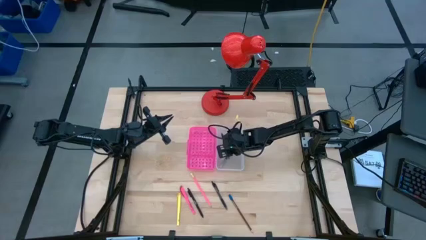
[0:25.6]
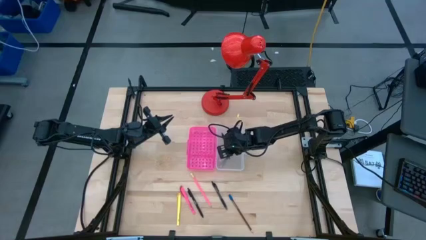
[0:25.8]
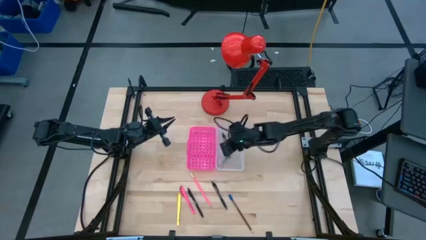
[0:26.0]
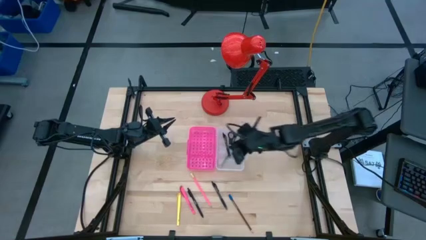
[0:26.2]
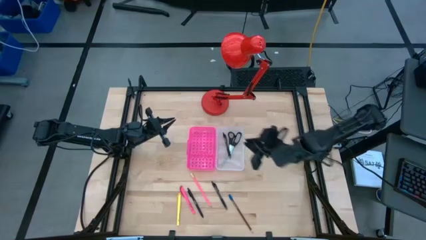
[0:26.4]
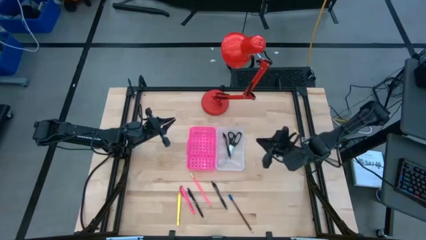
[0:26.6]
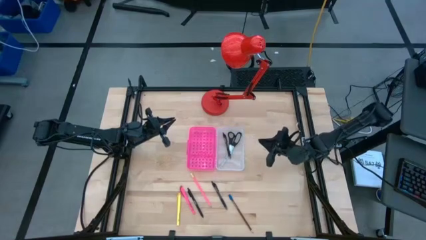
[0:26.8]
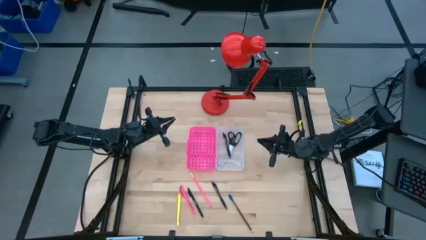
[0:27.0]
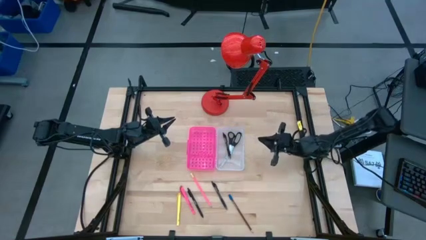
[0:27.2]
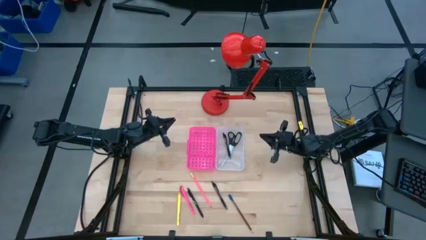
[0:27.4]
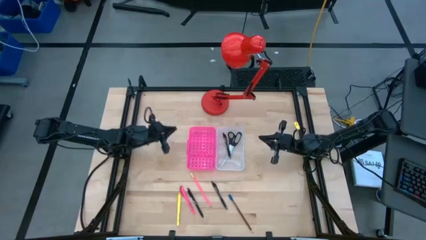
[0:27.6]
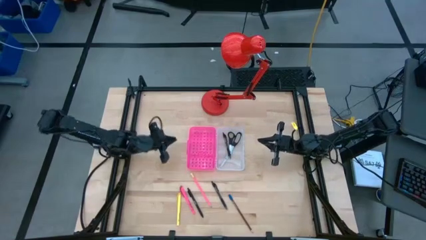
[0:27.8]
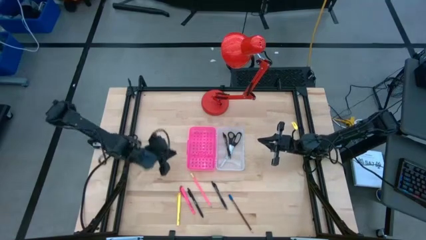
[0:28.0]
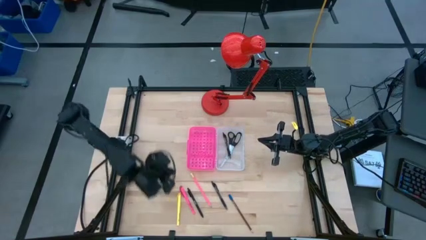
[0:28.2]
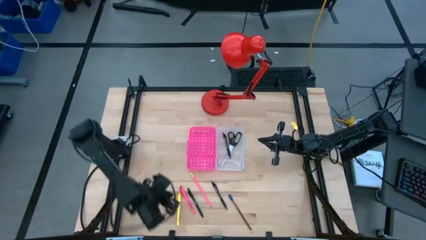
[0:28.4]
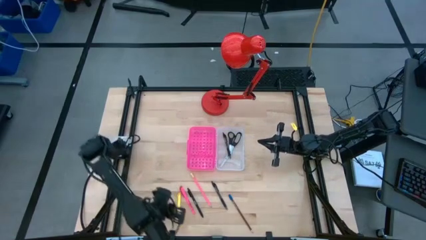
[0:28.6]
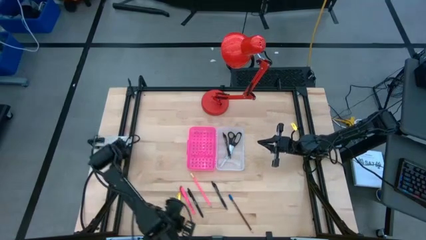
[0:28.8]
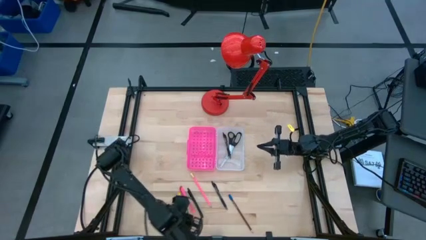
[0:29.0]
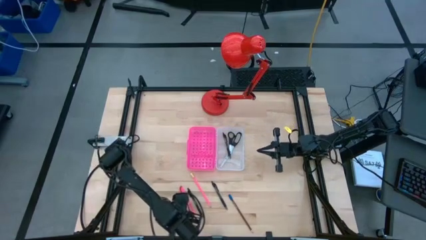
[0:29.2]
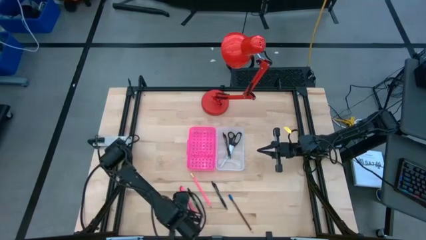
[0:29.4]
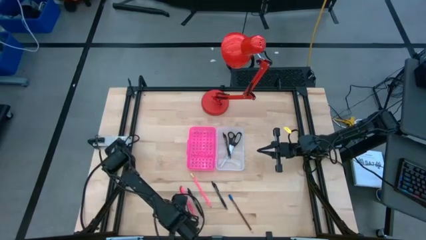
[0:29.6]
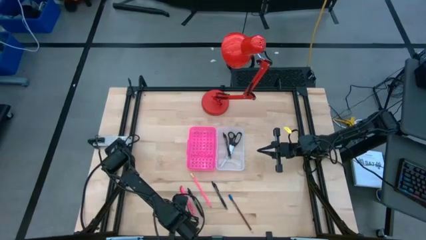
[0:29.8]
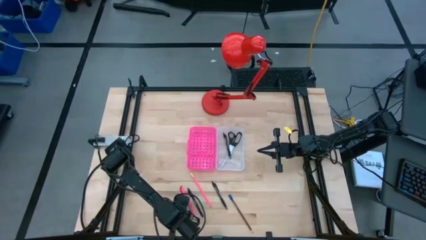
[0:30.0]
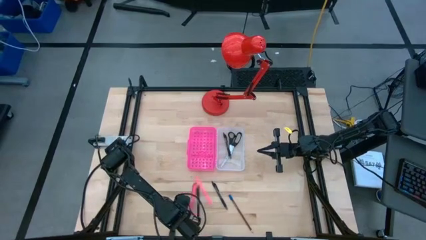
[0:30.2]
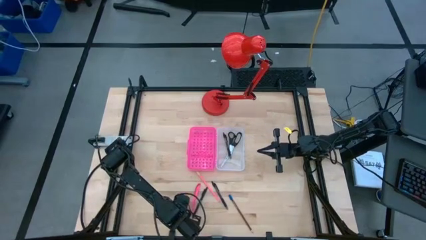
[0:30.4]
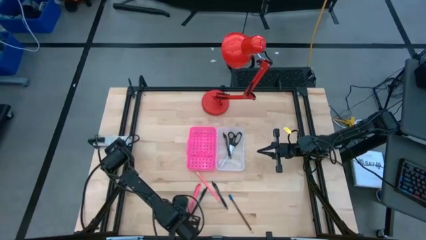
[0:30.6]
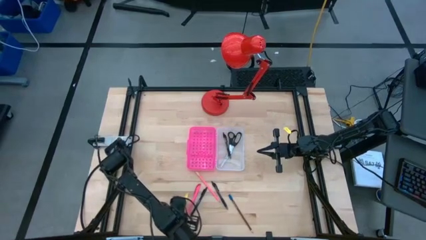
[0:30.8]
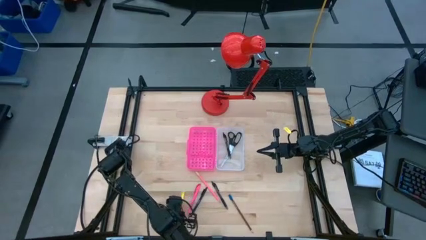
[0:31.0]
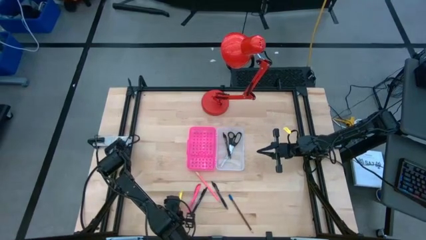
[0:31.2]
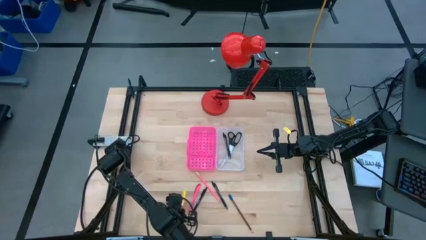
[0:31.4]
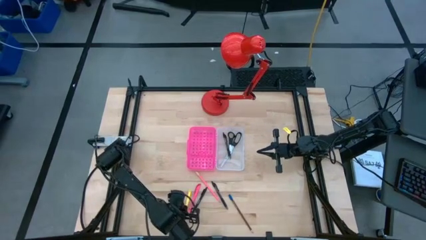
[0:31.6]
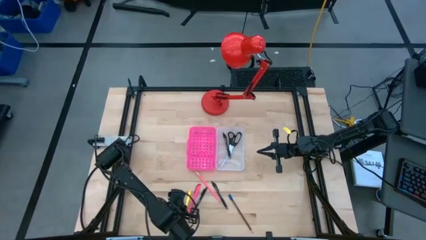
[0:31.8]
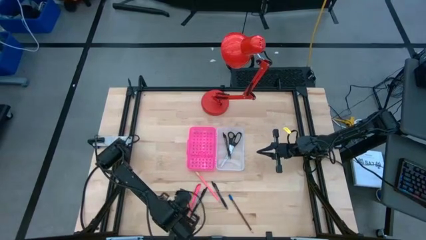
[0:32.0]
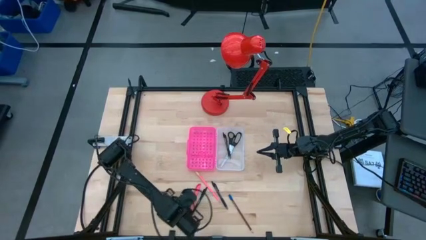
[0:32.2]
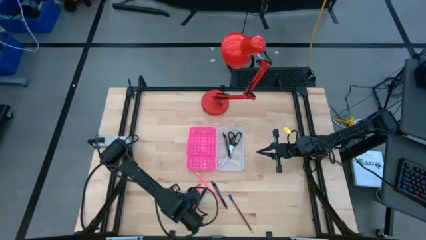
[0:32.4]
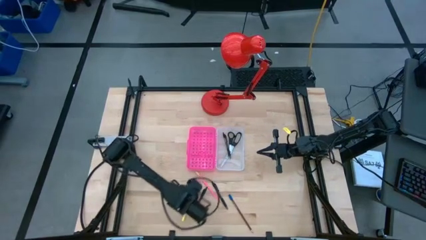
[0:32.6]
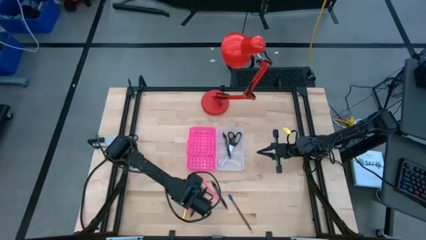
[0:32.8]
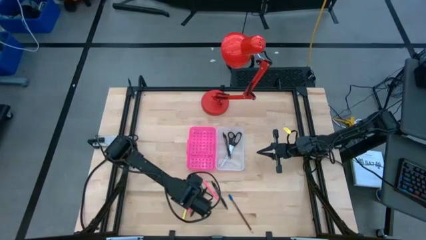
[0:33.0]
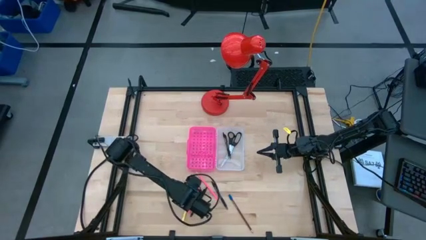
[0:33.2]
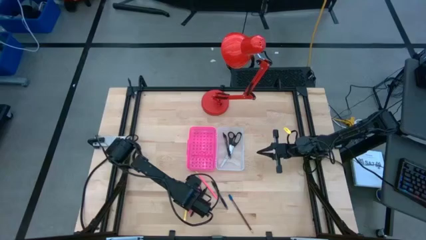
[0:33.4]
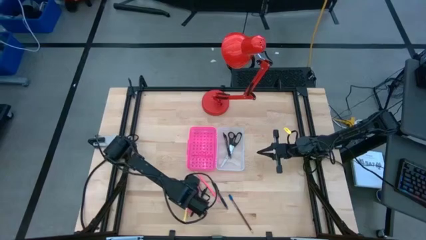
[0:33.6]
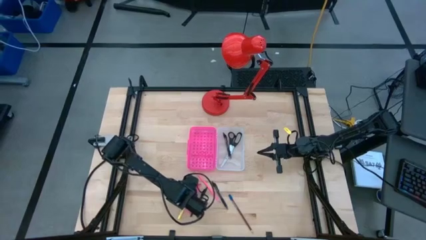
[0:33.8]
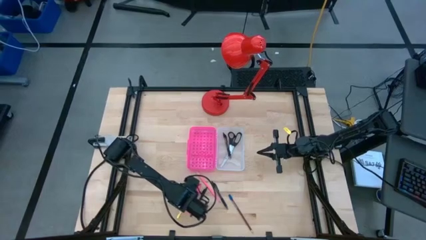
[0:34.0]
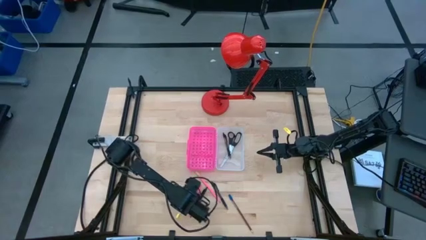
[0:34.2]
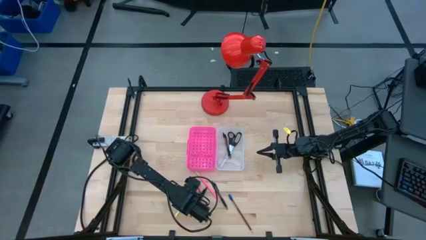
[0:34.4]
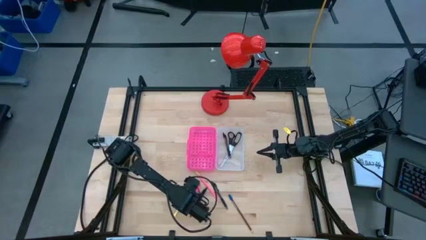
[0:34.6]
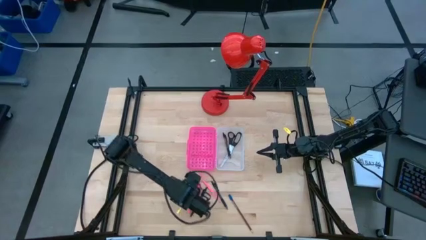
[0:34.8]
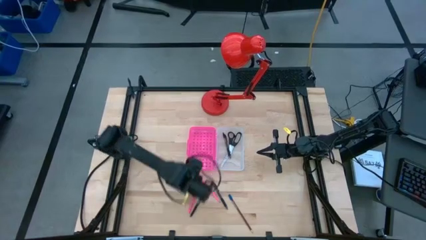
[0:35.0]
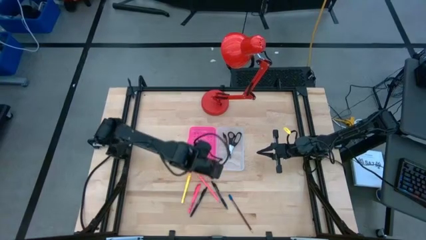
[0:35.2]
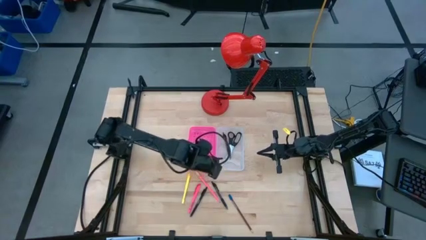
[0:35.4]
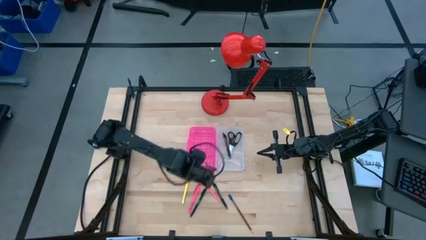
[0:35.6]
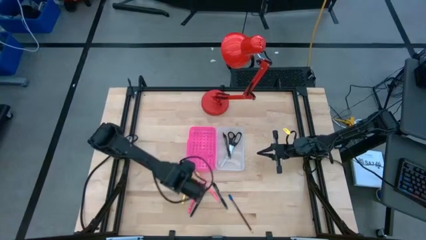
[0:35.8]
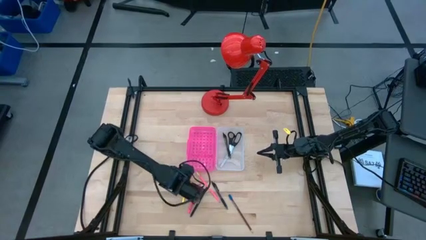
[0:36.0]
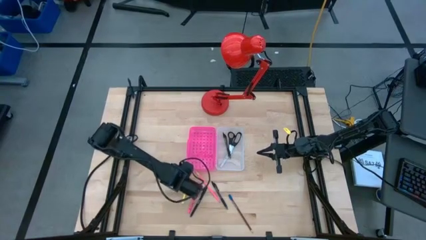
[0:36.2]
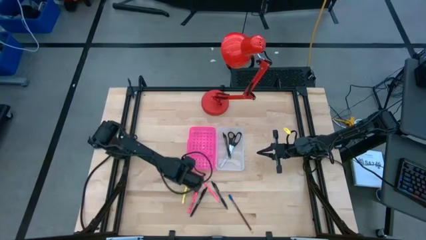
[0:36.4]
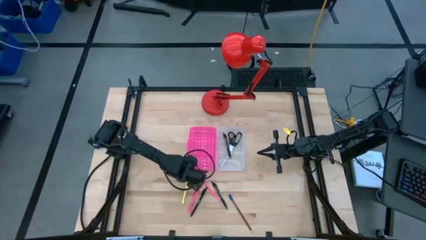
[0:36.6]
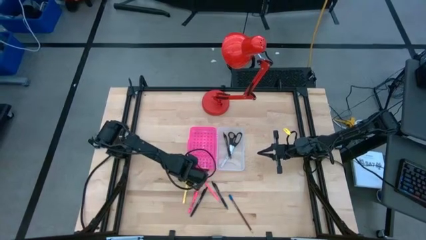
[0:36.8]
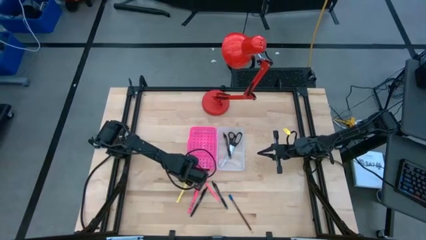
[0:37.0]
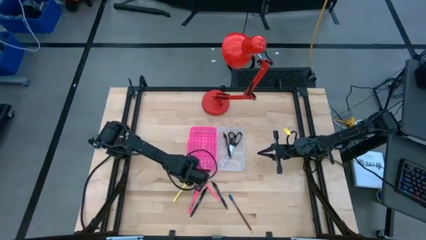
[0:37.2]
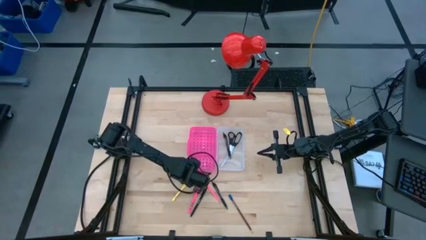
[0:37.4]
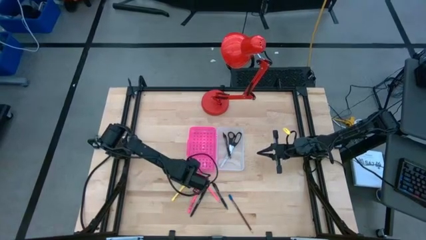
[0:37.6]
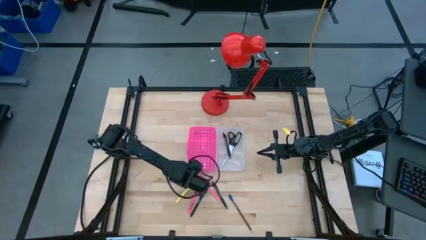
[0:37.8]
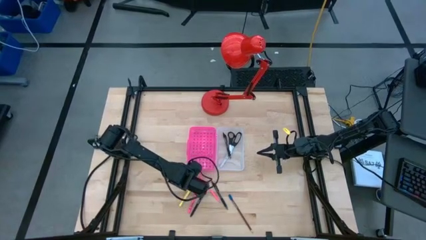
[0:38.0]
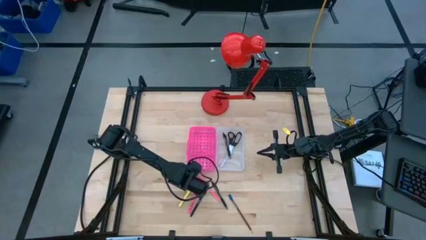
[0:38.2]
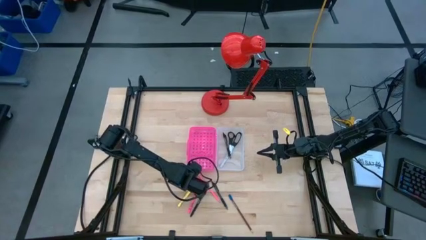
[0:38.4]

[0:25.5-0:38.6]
Task: Pick & place school supplies into a supply box
Put the yellow pen into the pink supply box

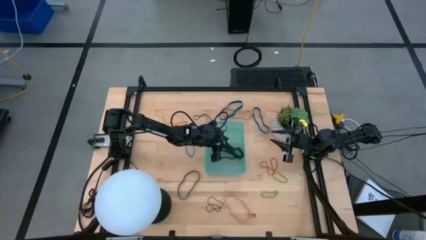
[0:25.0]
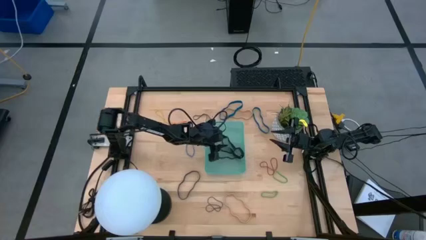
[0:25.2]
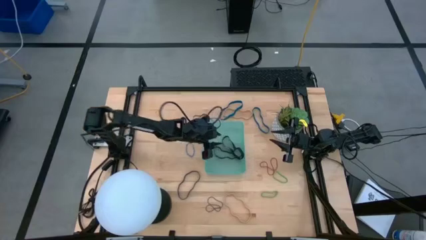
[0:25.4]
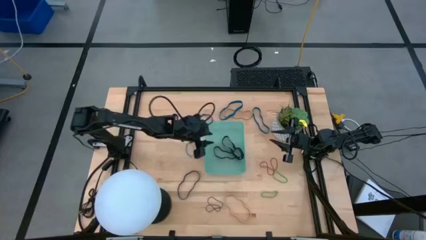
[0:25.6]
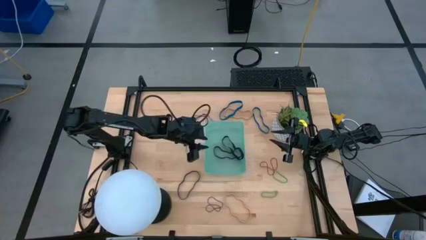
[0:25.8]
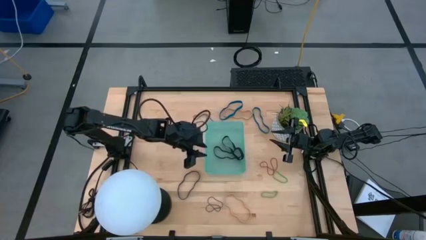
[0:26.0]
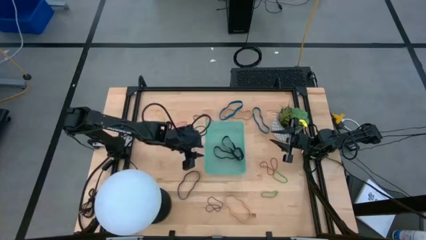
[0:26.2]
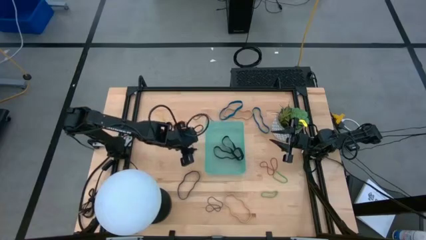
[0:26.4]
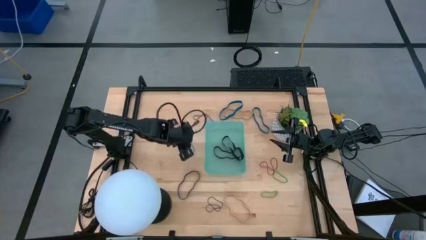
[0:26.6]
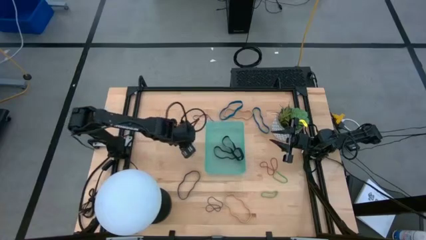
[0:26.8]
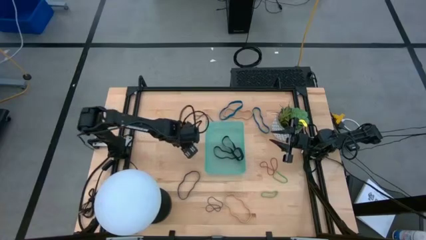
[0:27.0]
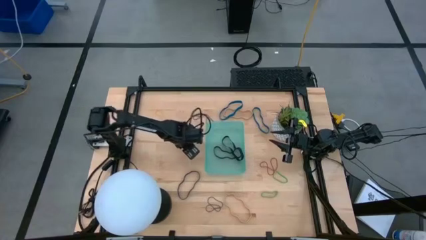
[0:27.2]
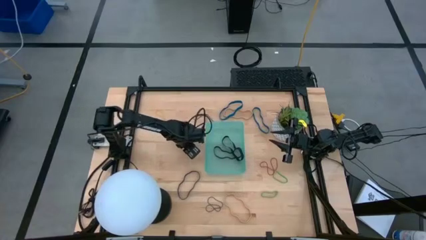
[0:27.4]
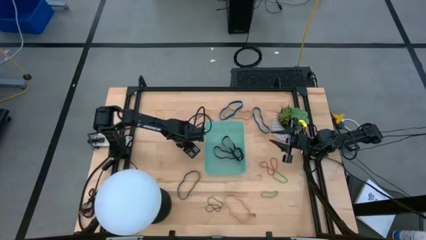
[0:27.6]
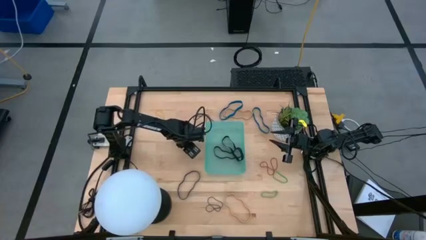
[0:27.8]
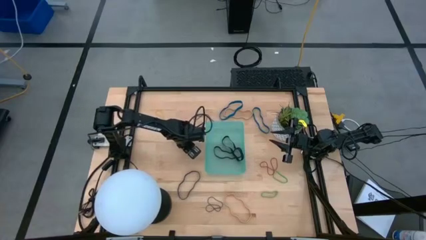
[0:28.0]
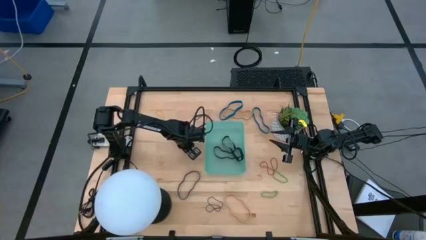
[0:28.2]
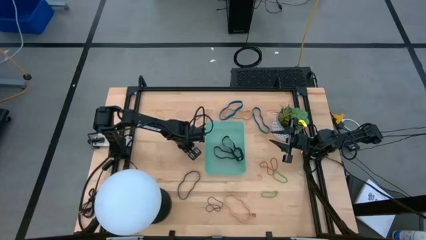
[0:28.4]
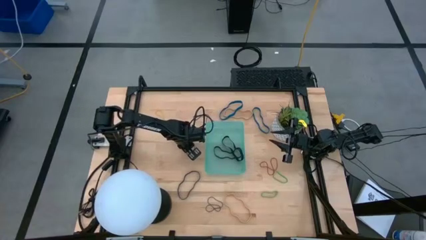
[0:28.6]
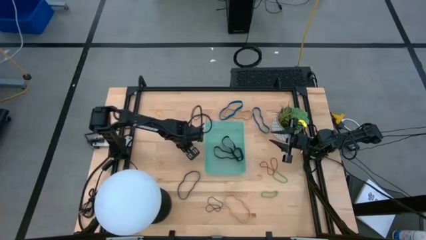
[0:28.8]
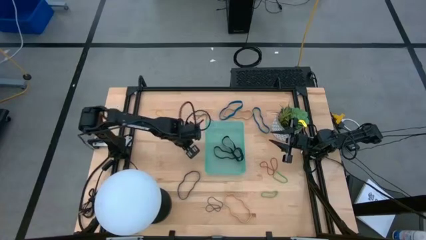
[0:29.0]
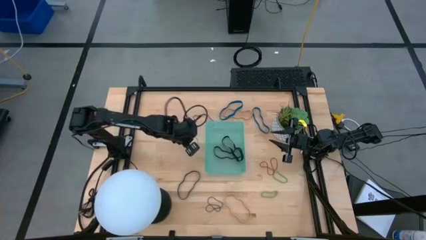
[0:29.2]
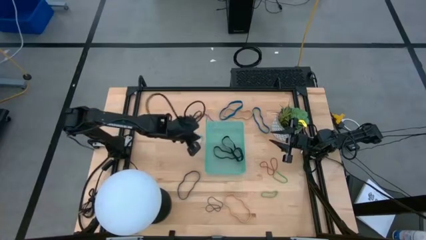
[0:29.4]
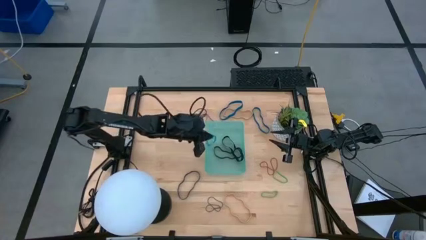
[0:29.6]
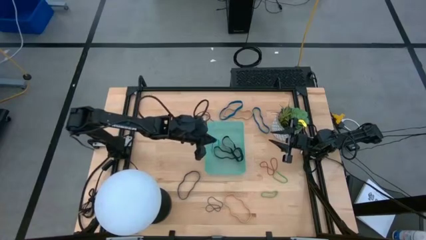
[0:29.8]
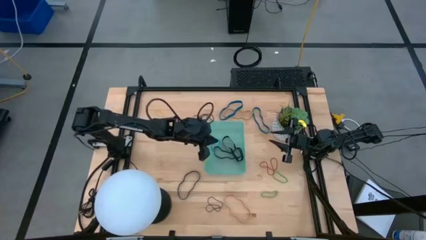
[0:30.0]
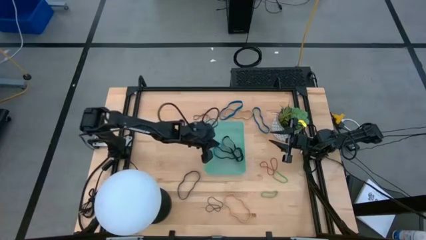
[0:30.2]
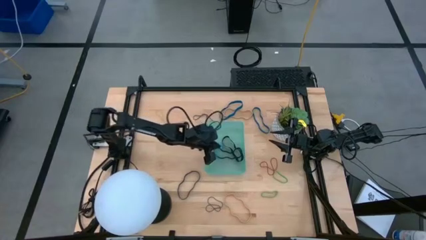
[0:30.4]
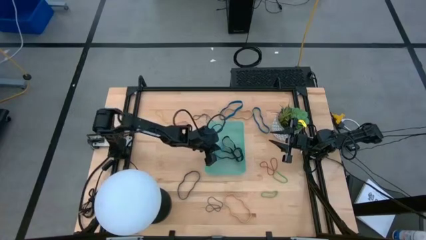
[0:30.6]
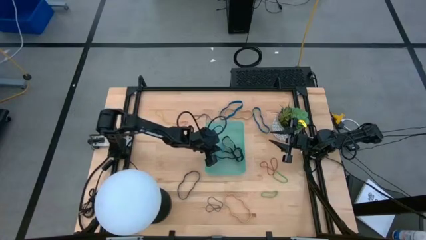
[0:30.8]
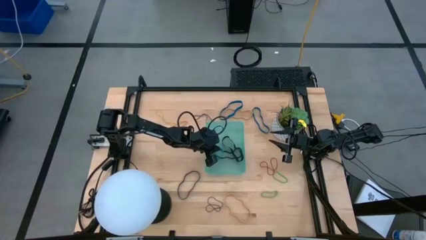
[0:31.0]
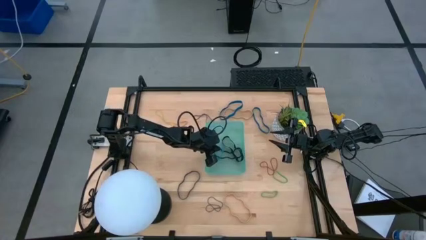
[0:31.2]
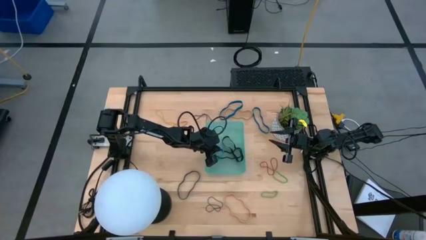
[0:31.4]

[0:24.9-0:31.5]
Task: Pick and place rubber bands into bin
Put the blue rubber band into the green bin
